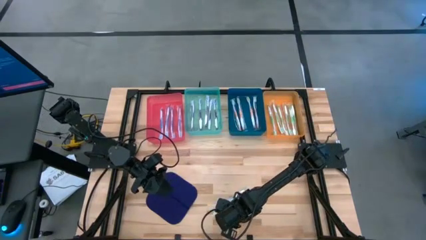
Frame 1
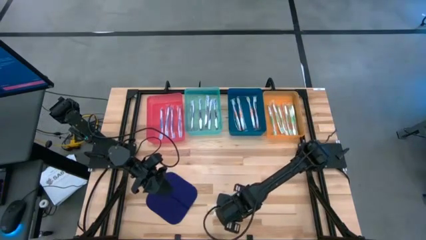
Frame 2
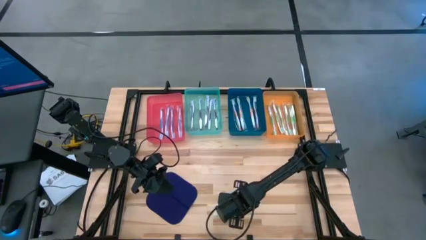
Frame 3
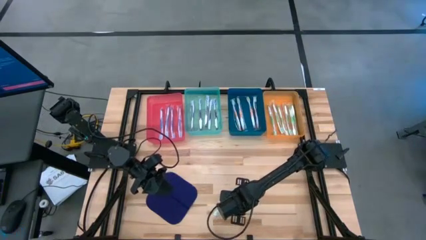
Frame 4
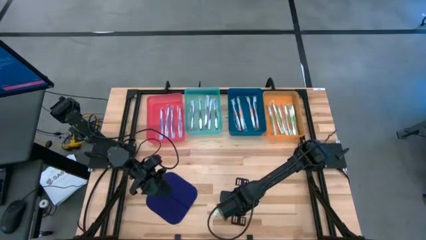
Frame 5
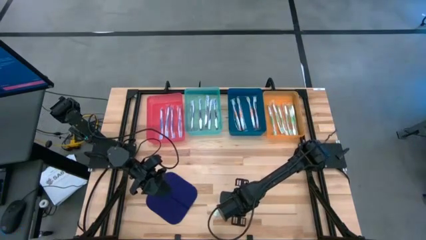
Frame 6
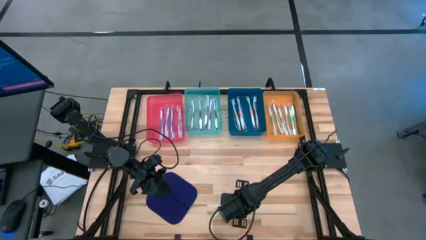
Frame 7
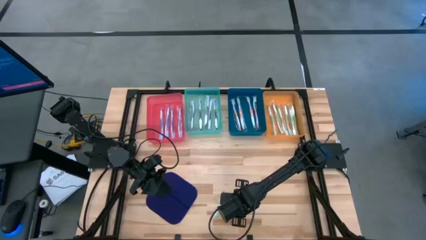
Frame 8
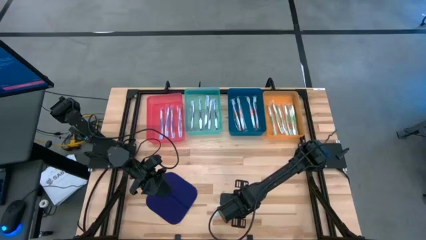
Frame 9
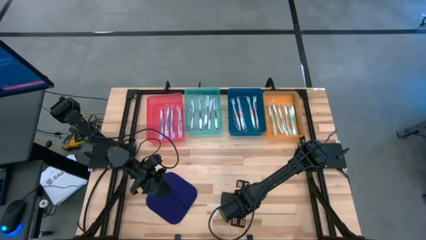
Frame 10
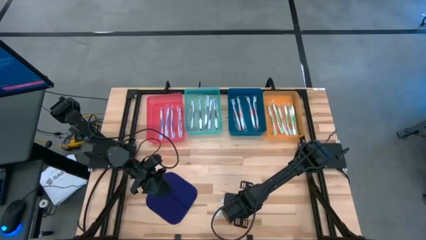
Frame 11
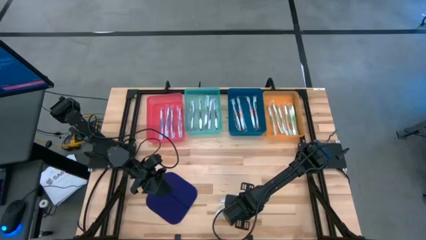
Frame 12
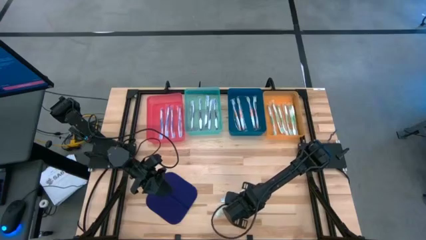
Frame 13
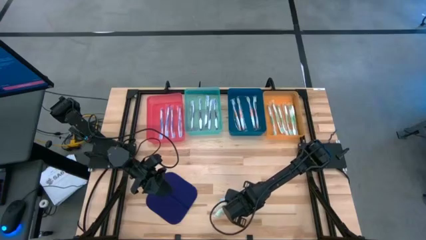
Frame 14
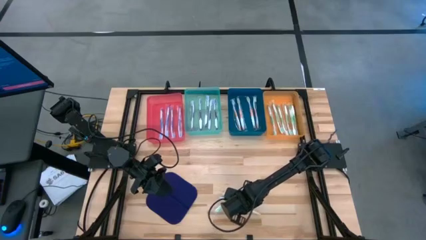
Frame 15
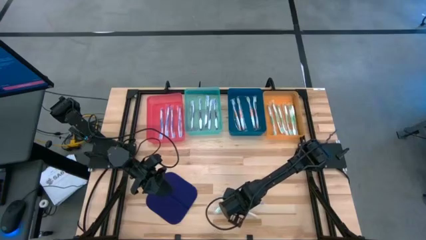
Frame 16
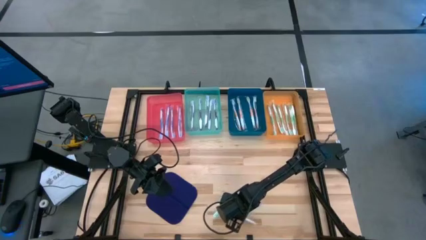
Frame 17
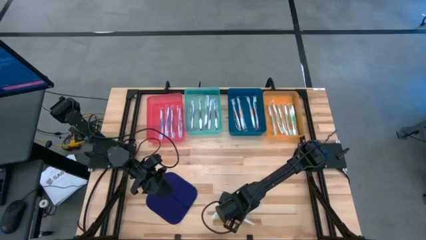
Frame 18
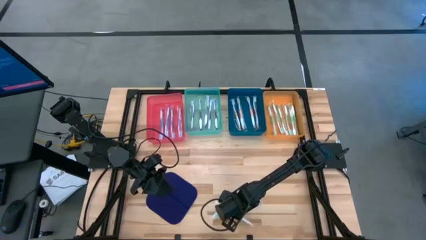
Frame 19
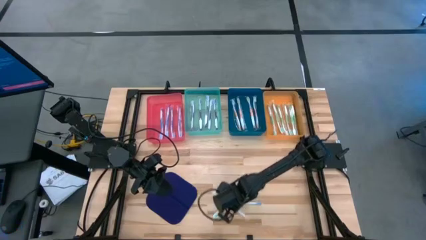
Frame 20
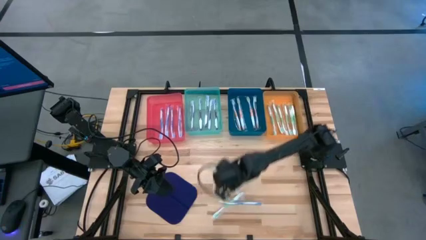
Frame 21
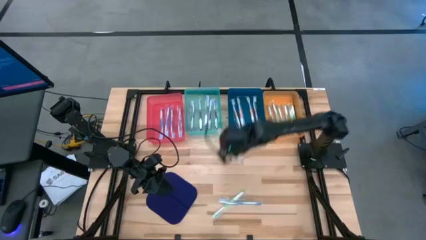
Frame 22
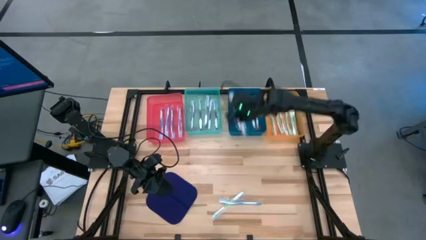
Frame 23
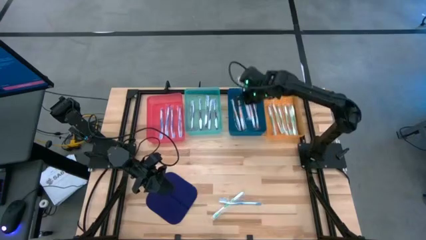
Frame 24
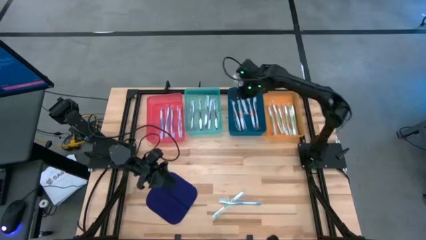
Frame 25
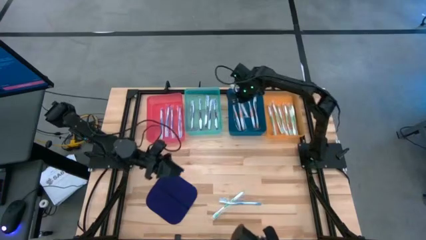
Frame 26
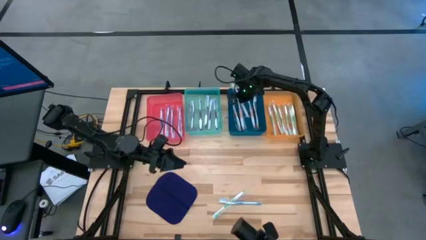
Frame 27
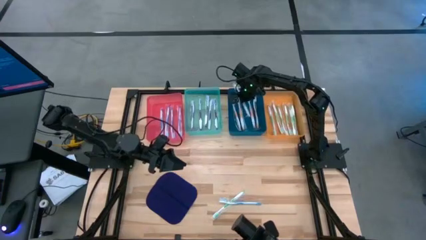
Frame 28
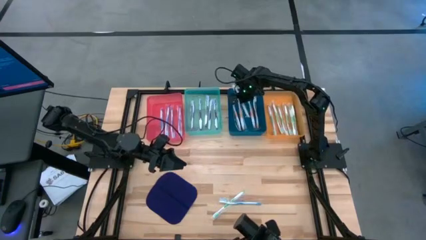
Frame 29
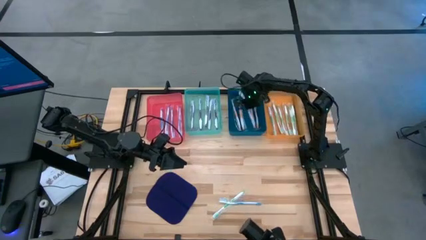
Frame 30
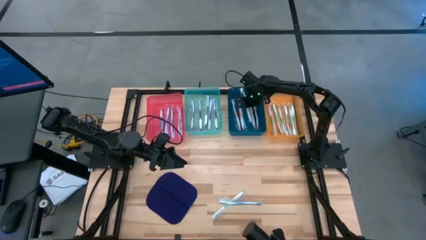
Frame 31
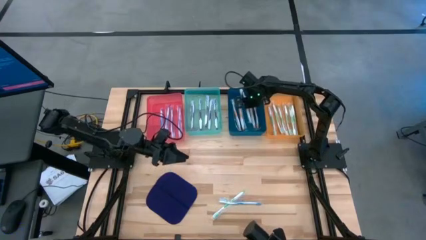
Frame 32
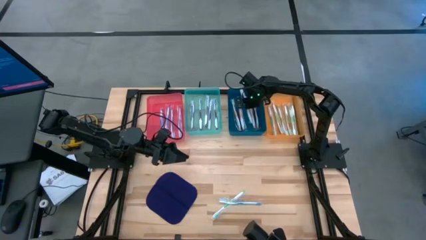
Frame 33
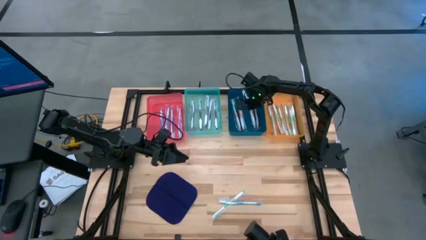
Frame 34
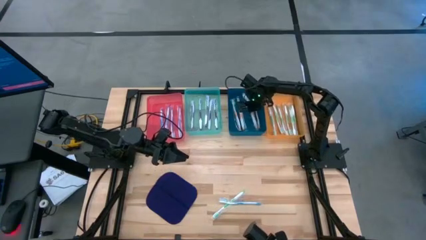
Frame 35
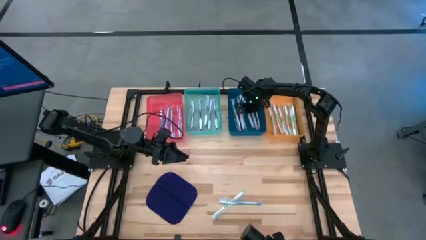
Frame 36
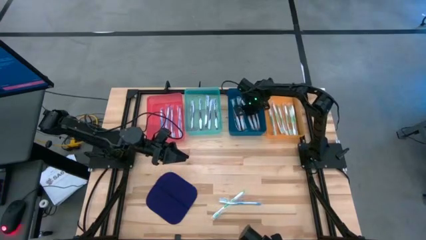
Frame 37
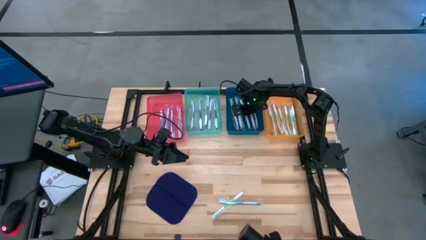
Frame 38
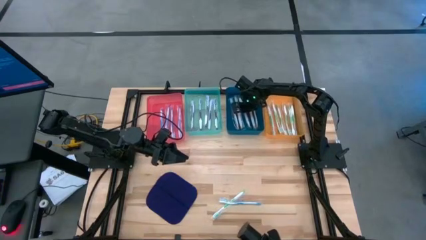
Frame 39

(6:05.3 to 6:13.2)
Task: Pick & Place Toothbrushes
Put the orange toothbrush into the blue bin

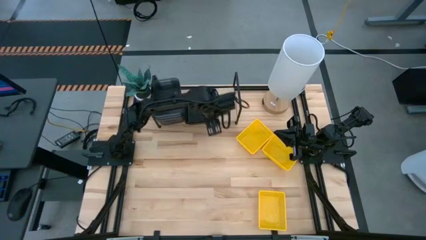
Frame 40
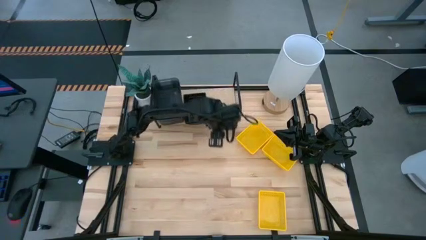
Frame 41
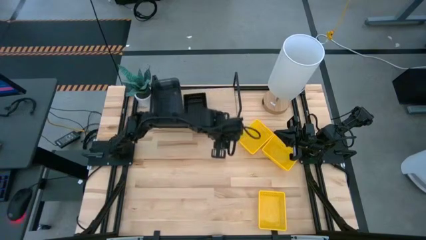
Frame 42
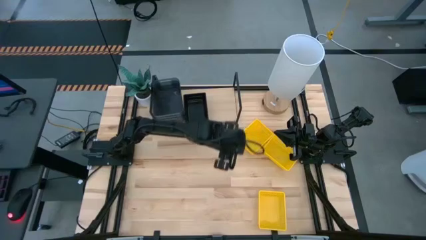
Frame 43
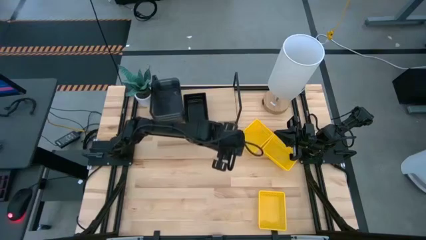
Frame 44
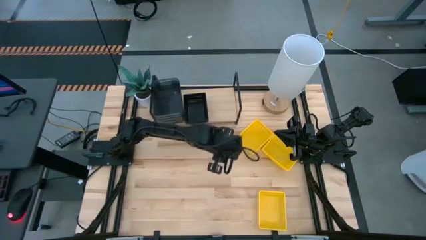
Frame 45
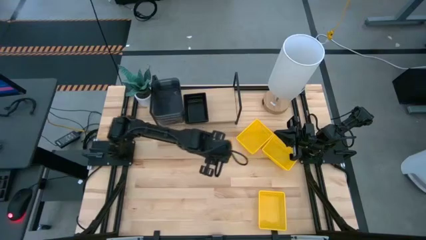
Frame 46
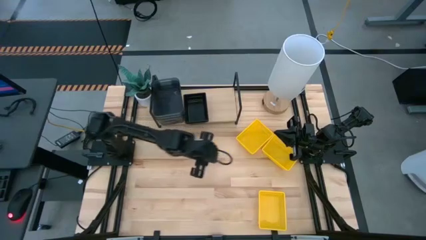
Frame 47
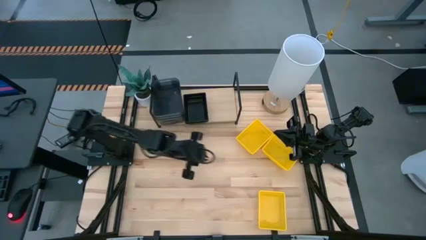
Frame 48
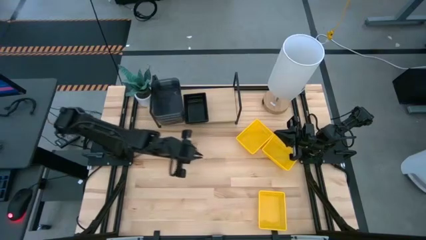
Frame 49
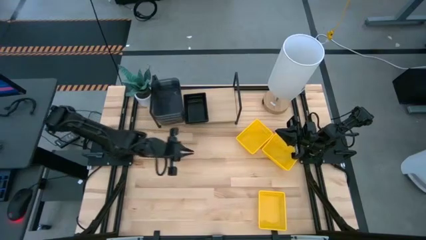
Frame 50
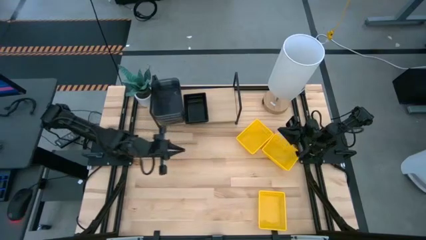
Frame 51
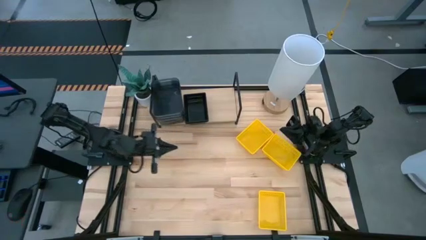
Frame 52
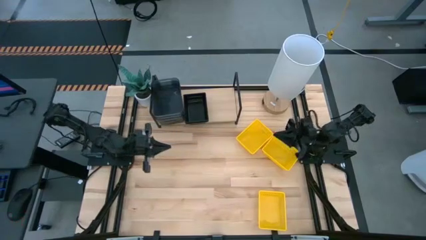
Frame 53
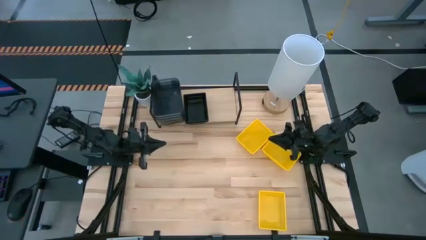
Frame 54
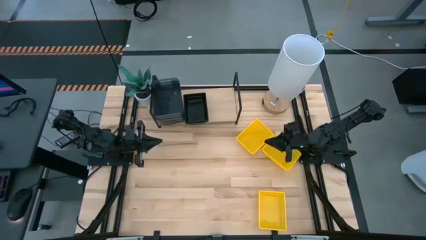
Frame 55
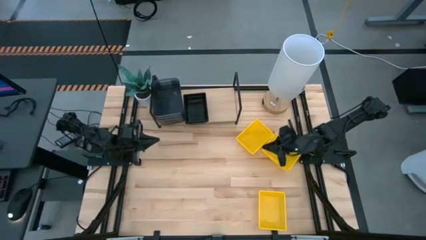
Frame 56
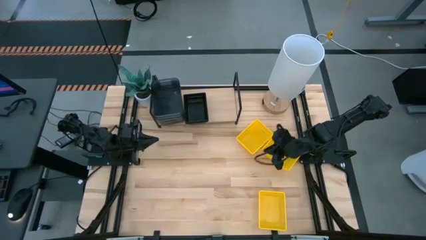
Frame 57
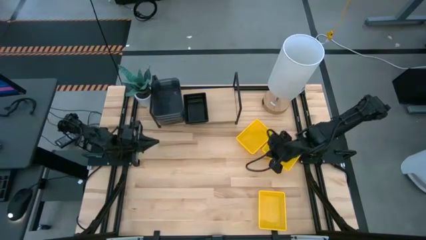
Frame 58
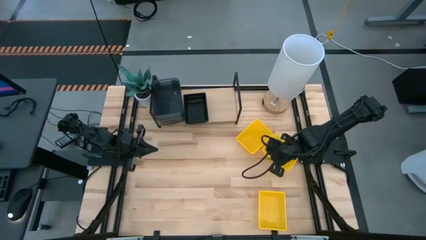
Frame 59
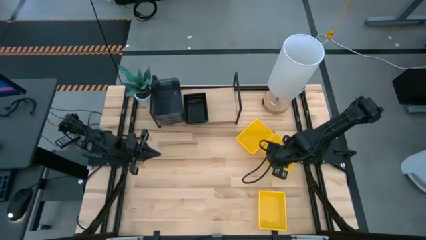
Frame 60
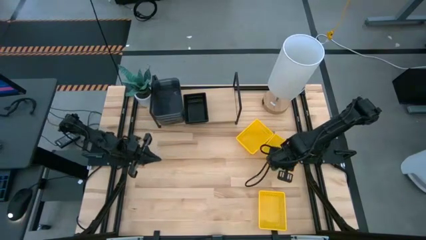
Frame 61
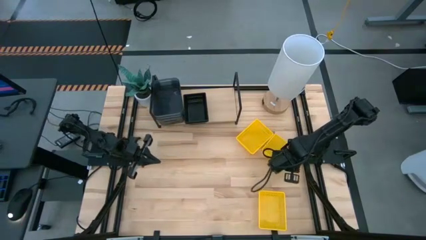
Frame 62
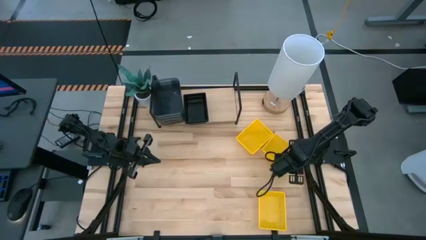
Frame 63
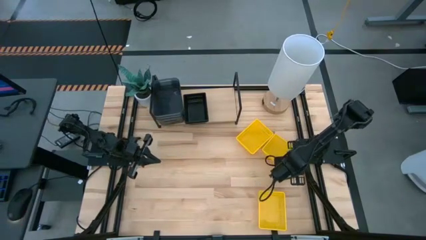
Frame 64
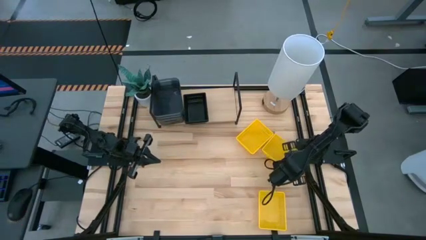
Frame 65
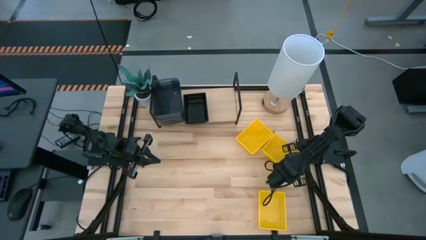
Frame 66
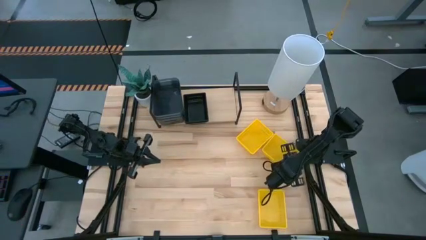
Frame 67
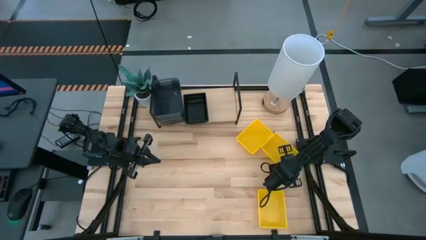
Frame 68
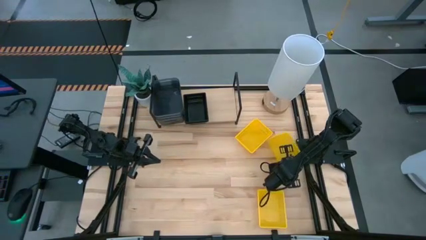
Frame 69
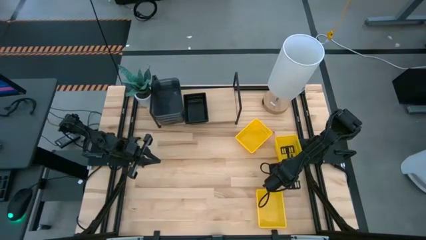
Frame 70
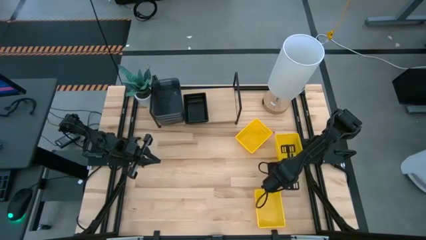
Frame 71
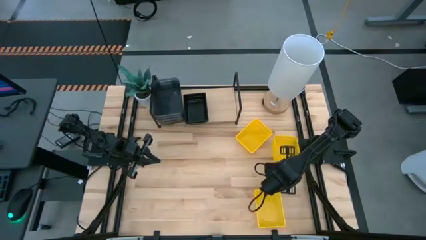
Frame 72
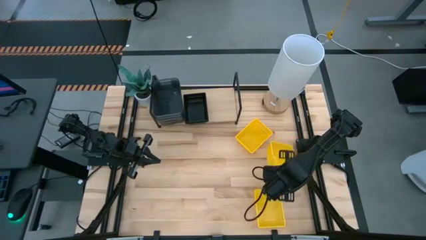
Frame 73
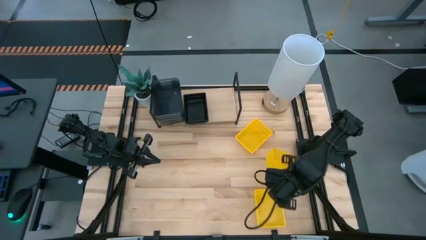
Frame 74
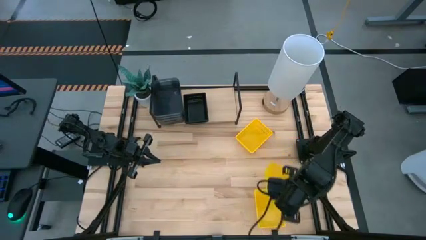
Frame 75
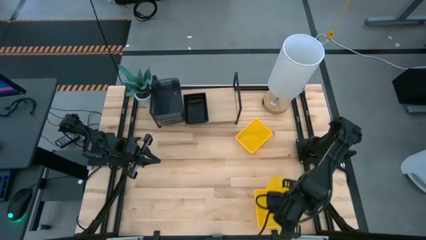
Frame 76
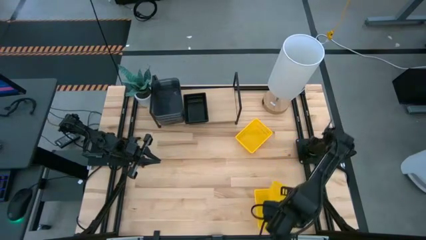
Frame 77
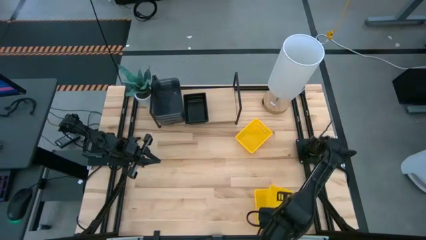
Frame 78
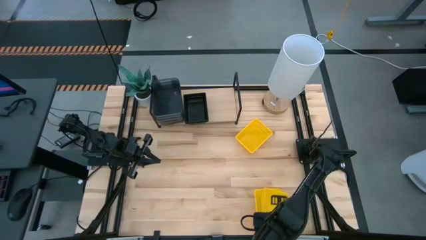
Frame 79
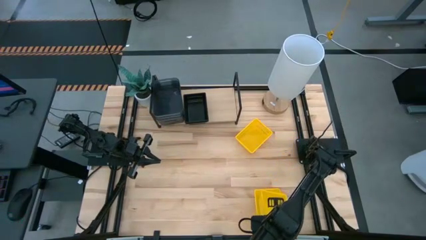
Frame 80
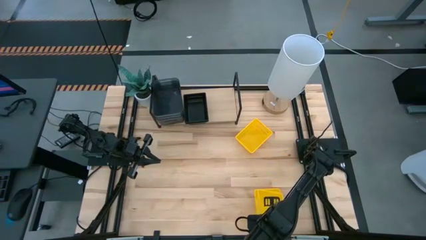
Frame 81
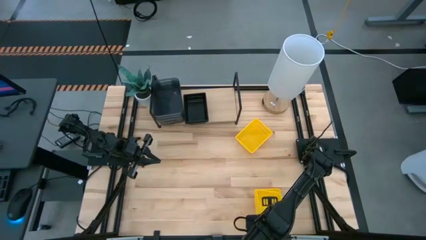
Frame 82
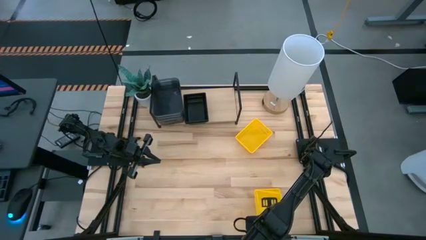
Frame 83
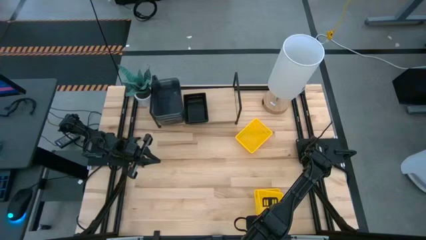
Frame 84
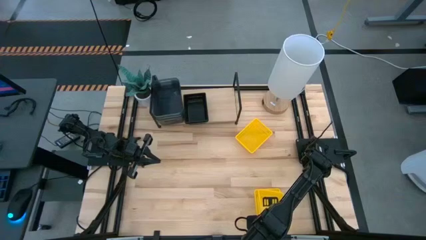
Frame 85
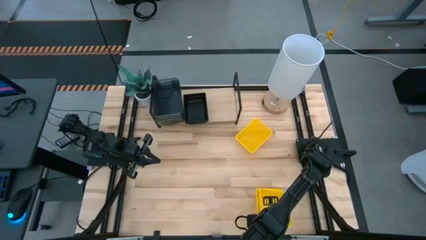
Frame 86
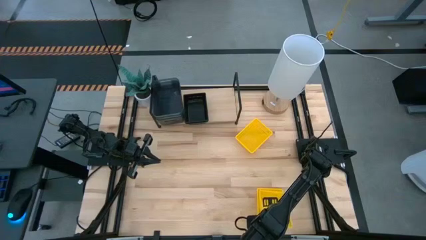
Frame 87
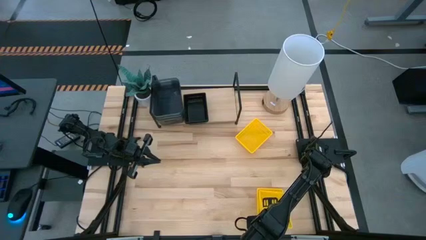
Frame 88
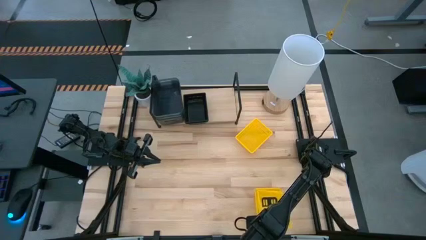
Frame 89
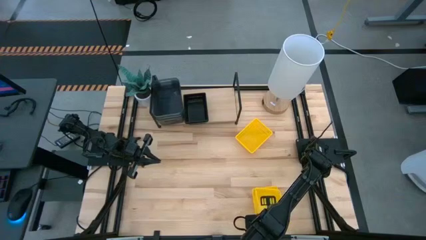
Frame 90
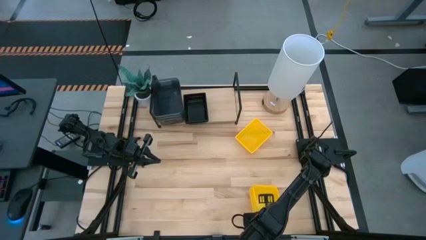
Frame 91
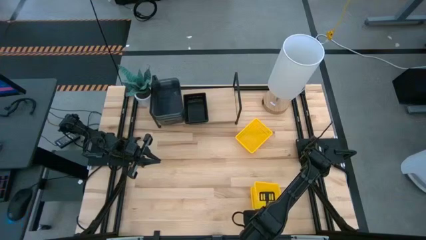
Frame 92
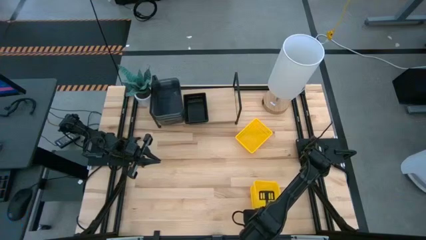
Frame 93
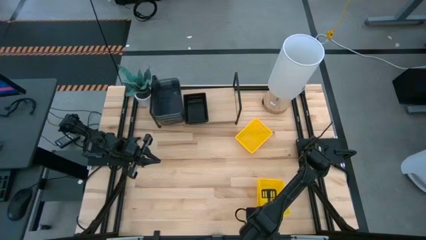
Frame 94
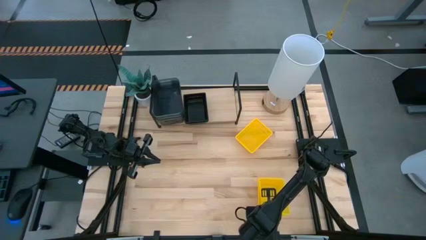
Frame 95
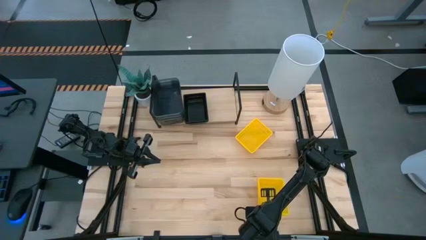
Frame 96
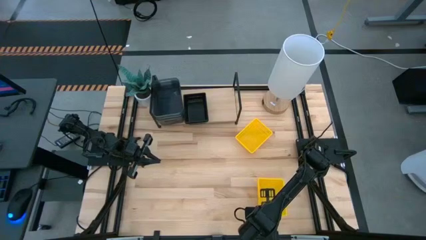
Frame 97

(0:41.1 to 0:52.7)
Task: Stack baskets on shelf by color
Stack the middle yellow basket on top of the bottom yellow basket
